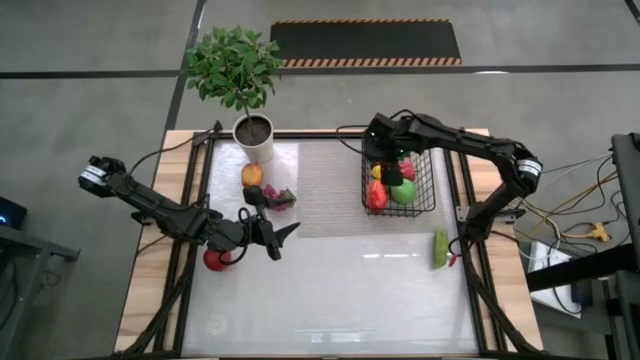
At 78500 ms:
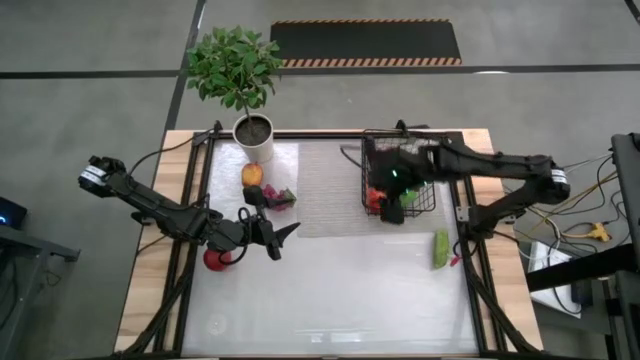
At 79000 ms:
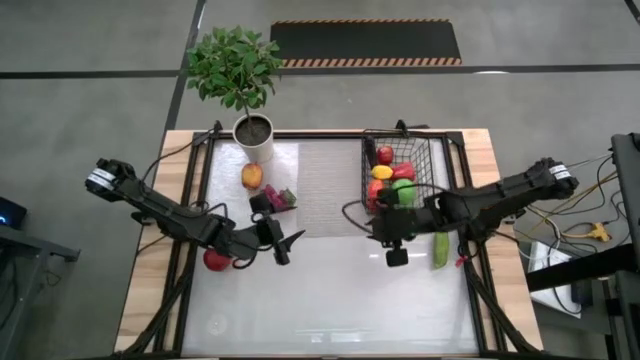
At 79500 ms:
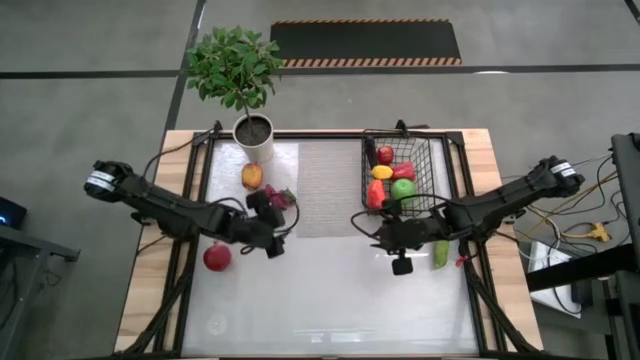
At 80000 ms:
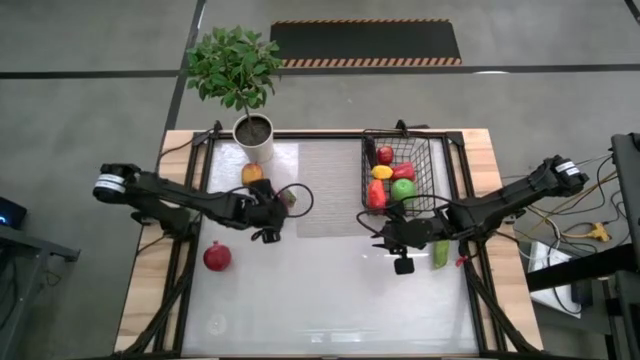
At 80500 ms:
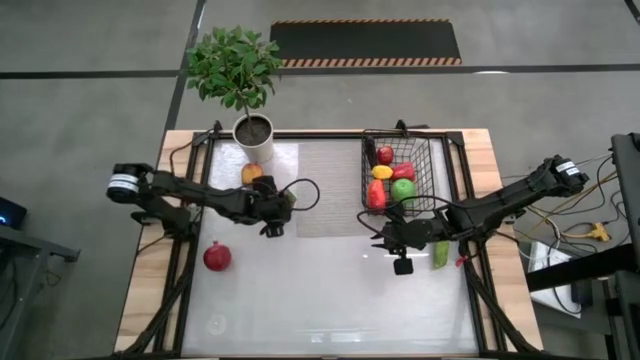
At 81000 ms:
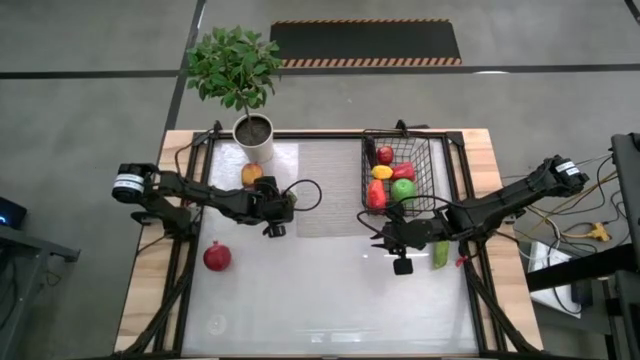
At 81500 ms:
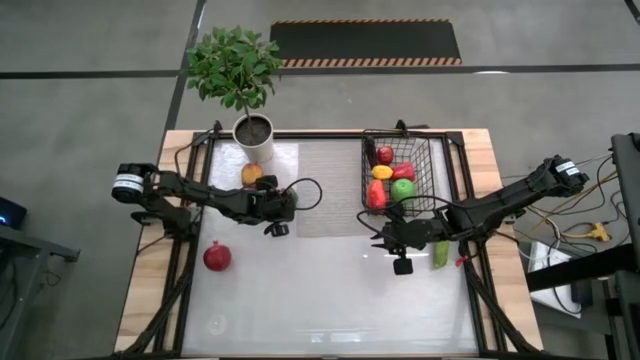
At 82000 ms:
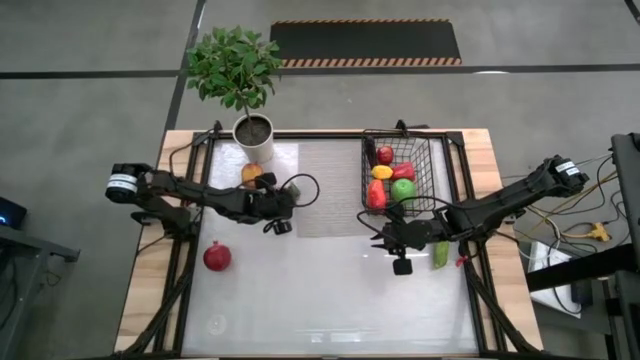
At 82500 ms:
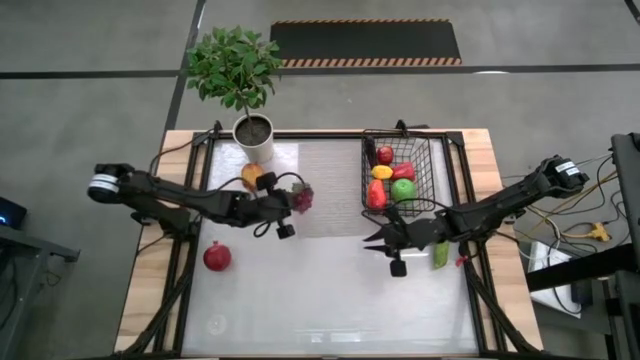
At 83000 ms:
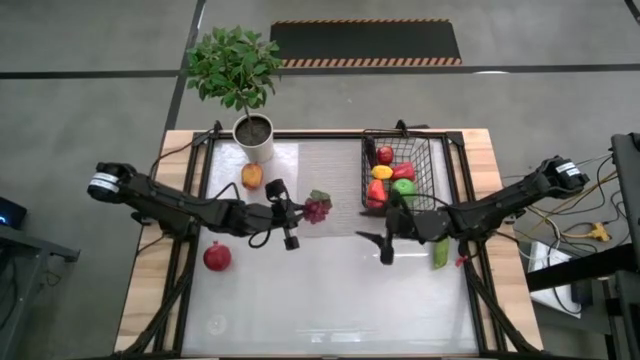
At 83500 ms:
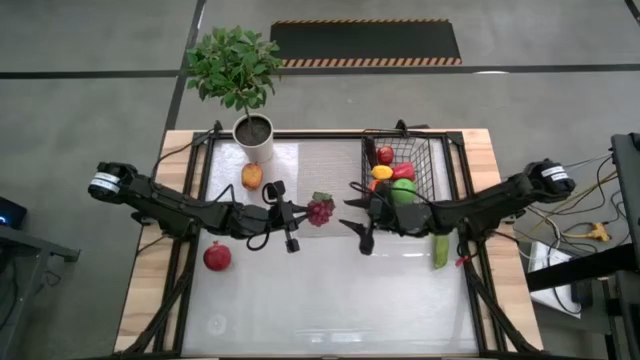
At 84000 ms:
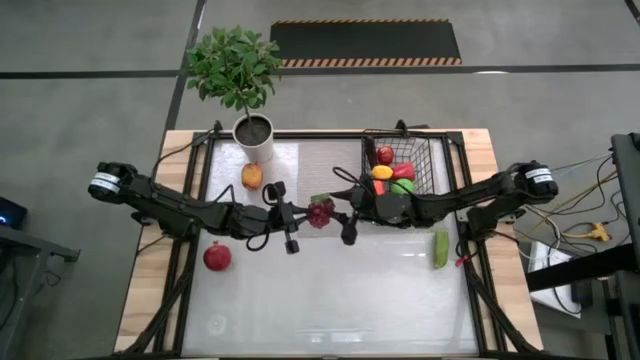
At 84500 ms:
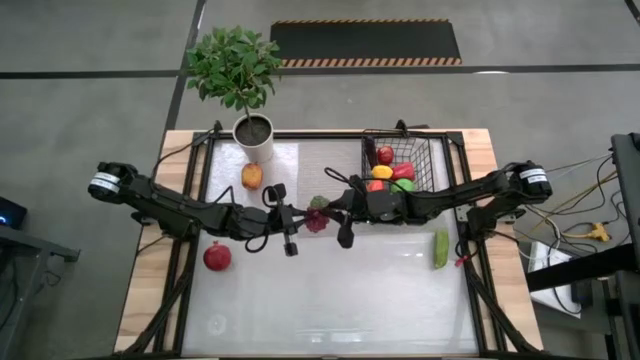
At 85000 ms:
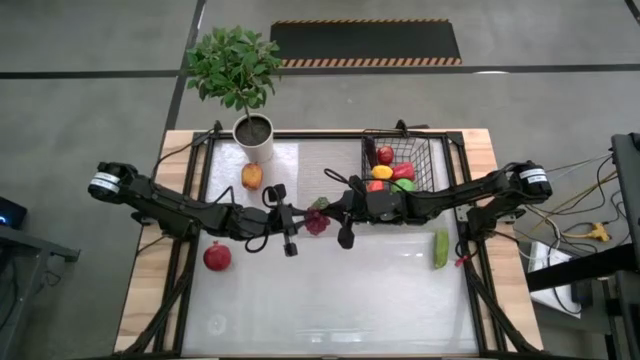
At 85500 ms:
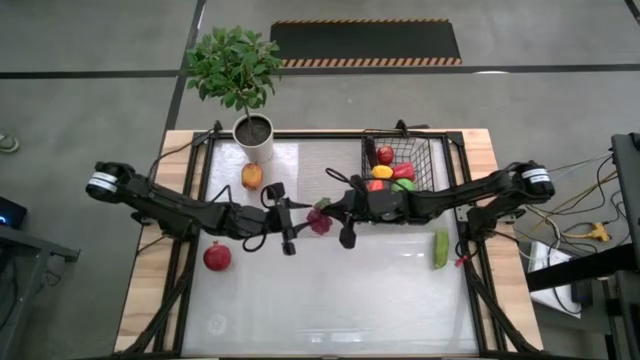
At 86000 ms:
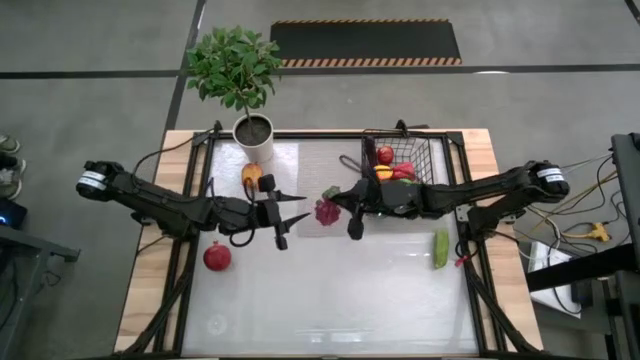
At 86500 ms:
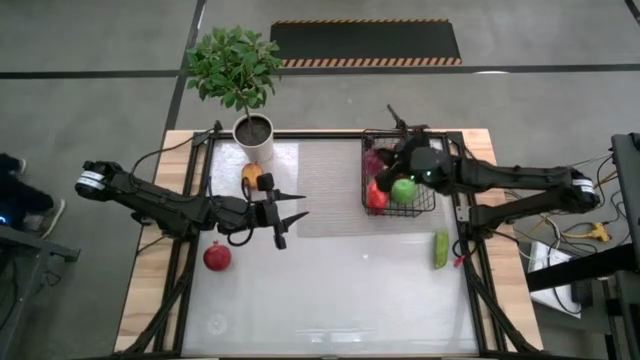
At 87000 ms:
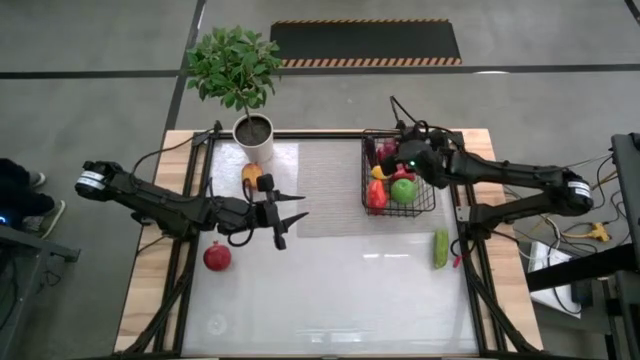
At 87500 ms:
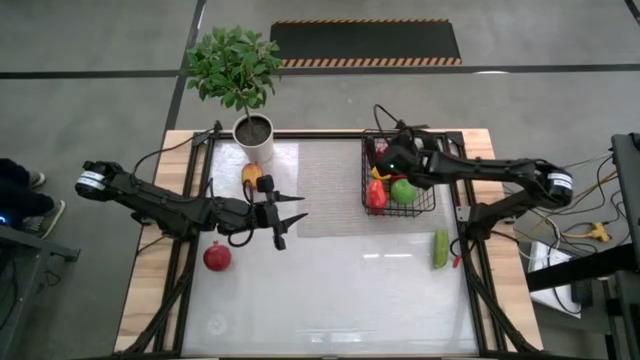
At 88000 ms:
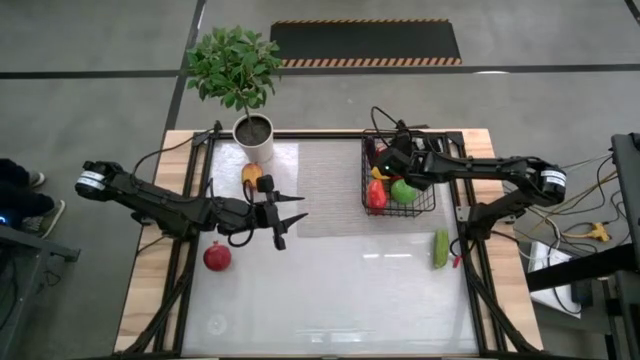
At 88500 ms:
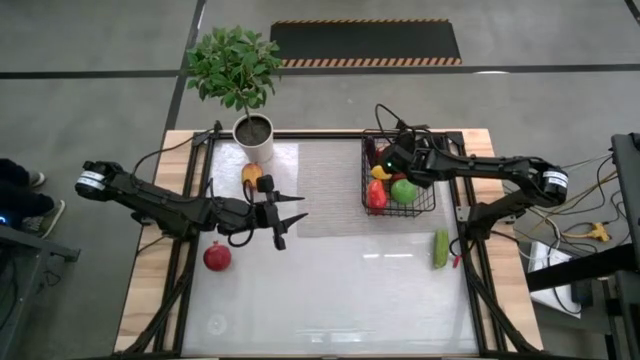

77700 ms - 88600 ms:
Task: Build produce basket
Put the purple grapes into the wire basket

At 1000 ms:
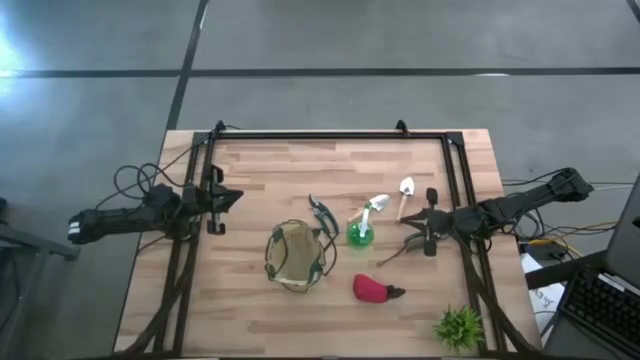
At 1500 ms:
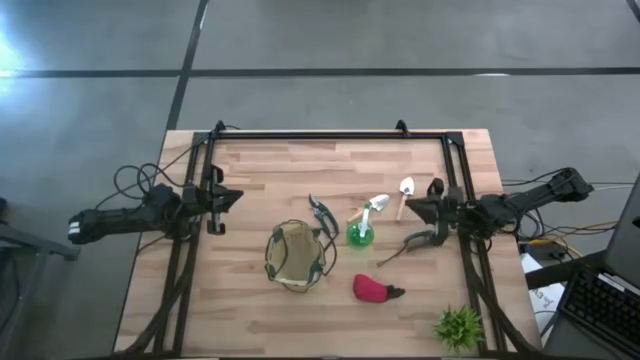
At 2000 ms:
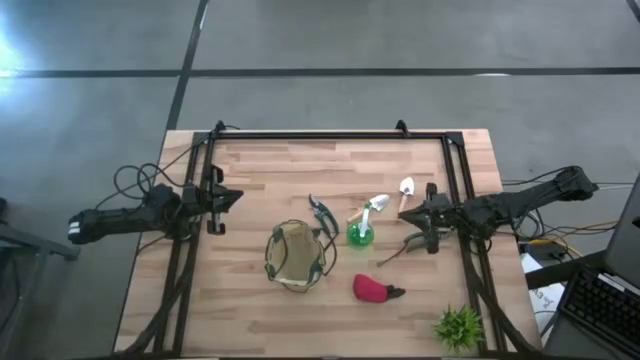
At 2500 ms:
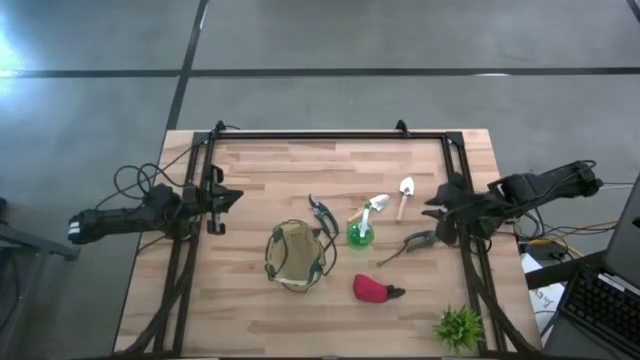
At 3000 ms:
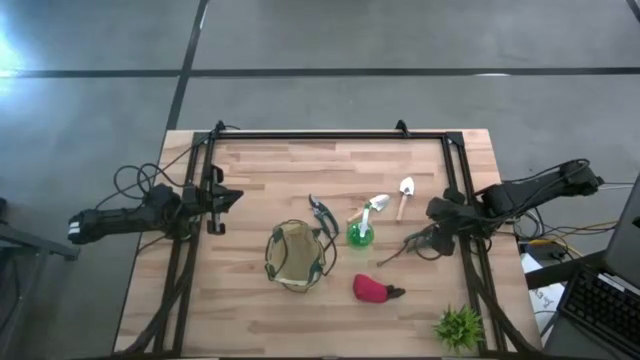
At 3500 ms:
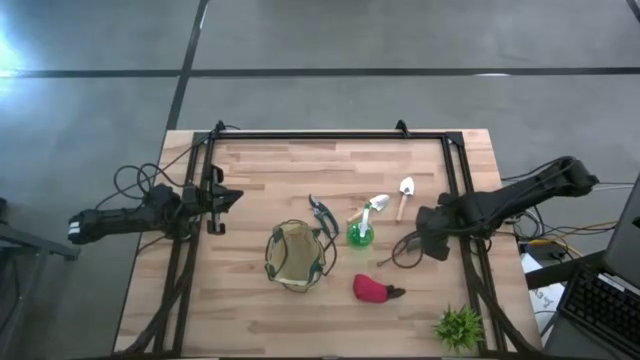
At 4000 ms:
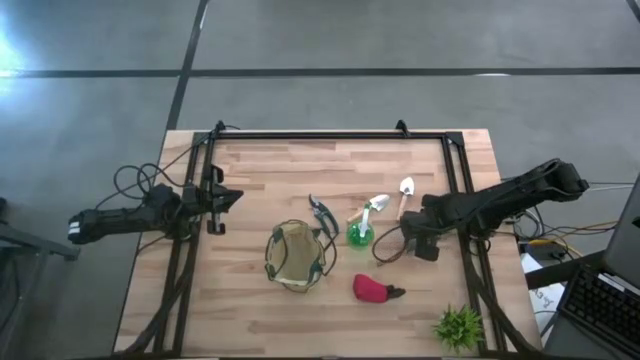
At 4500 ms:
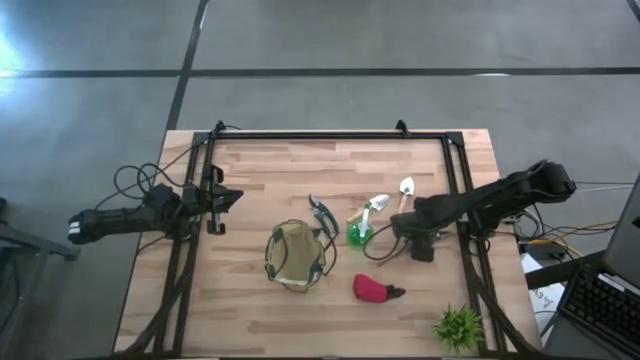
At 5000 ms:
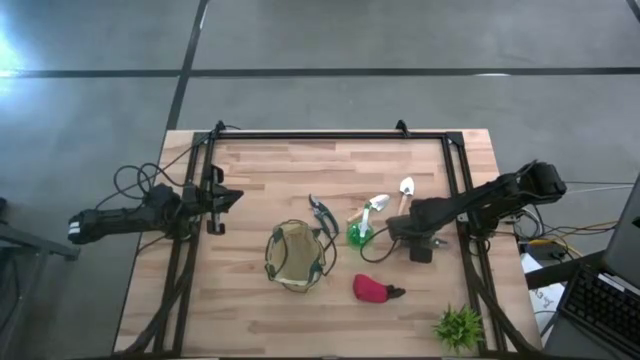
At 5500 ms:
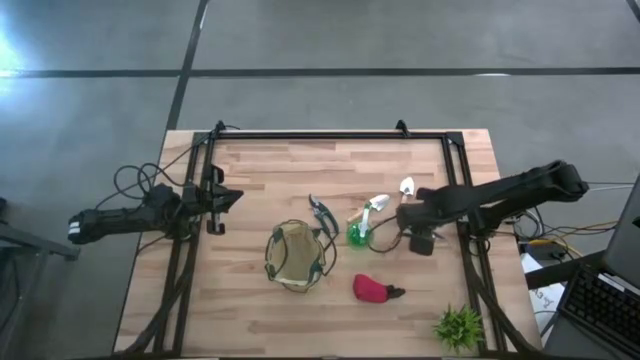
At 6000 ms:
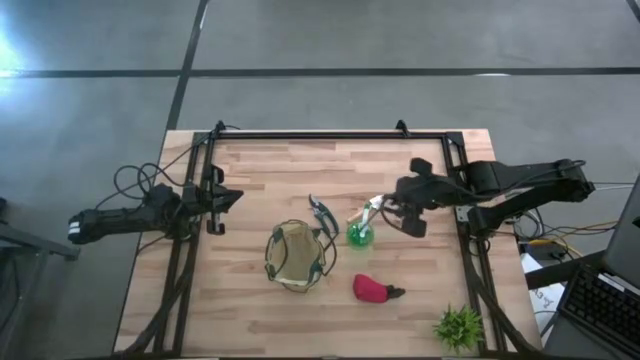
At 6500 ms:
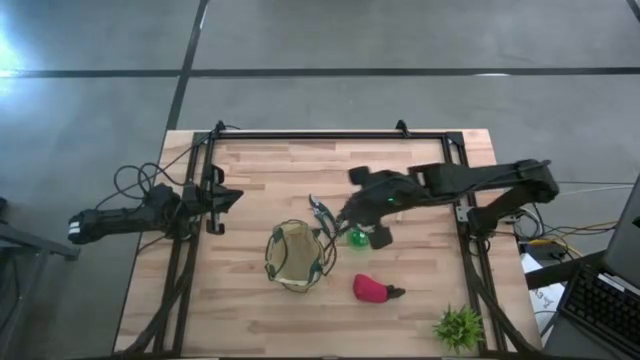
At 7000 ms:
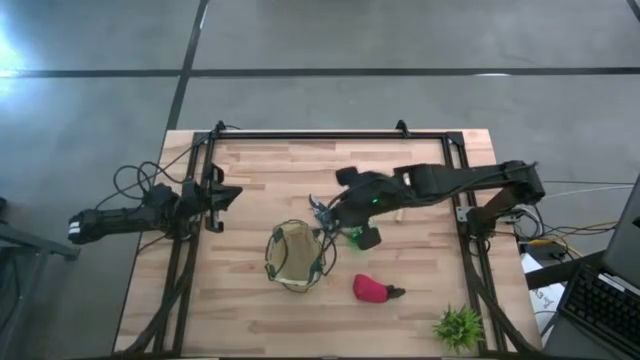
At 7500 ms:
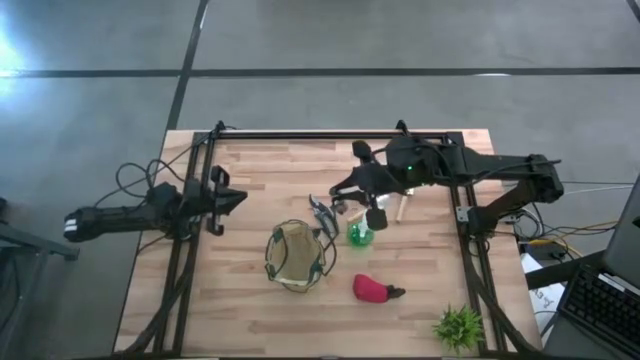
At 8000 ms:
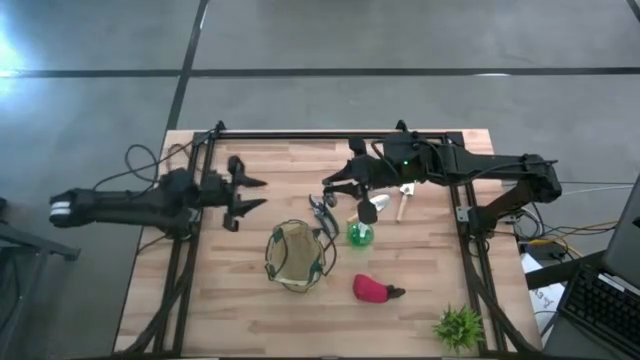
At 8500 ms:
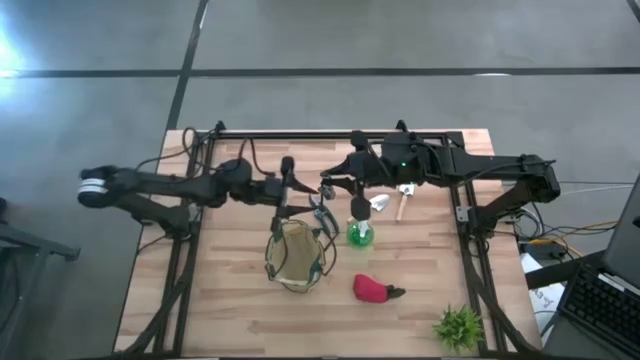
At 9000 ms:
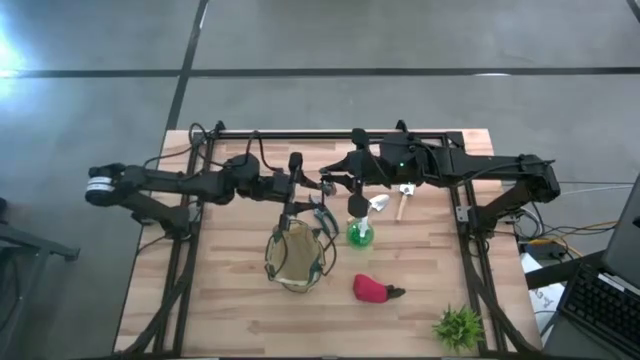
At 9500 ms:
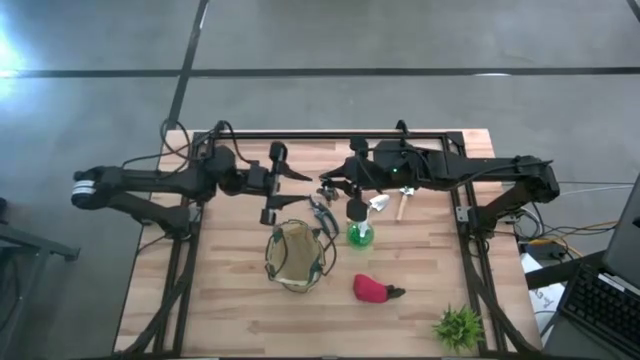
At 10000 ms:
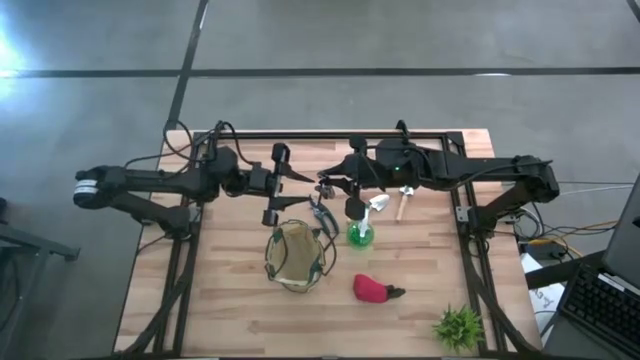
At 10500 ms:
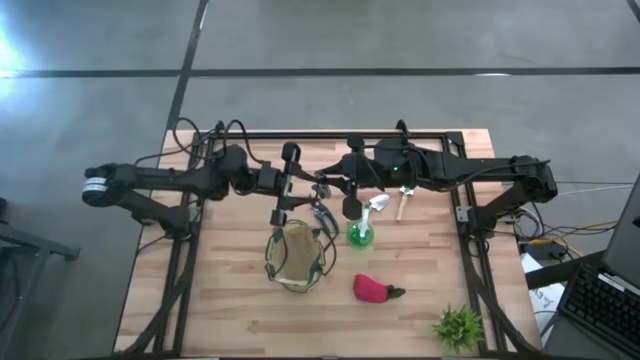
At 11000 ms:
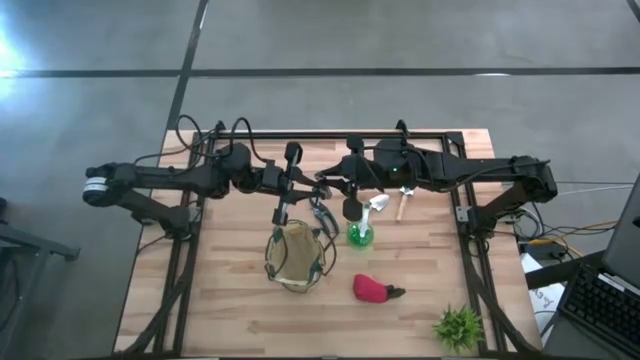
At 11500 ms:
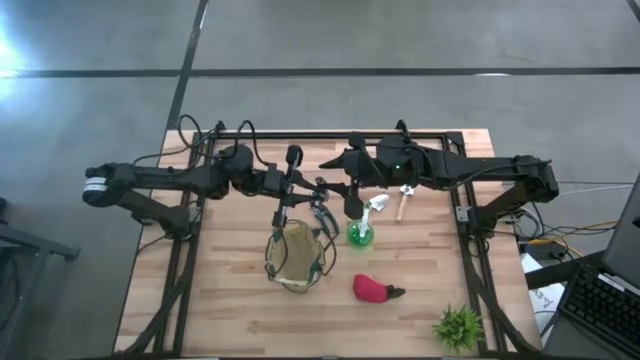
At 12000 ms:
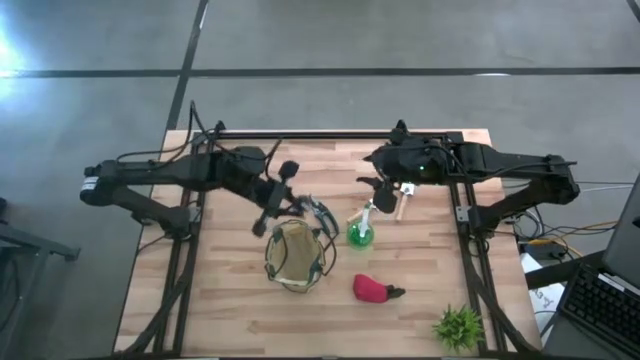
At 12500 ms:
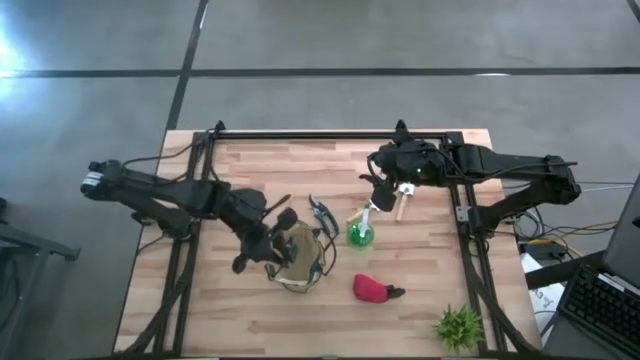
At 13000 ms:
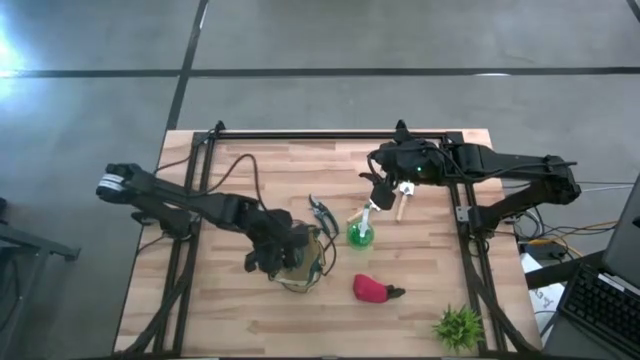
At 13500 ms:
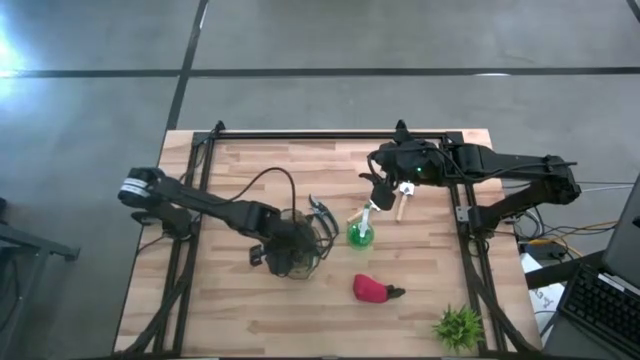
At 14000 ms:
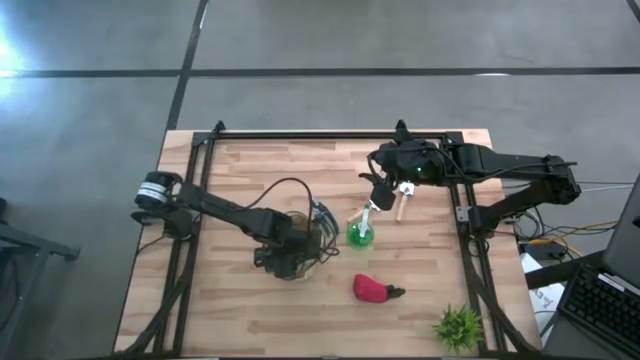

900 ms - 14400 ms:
Task: Pick & Place Garden tools in Gardening bag
Put the right green shear scissors into the gardening bag
